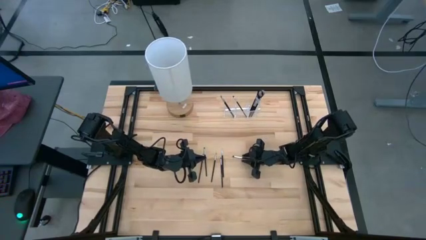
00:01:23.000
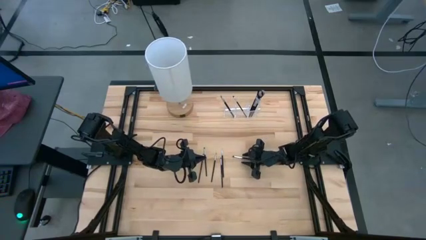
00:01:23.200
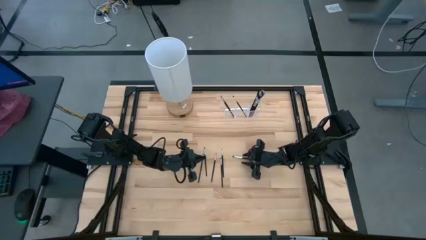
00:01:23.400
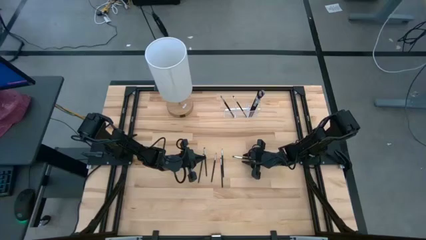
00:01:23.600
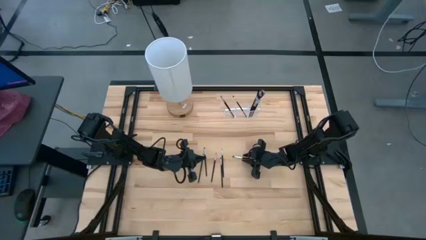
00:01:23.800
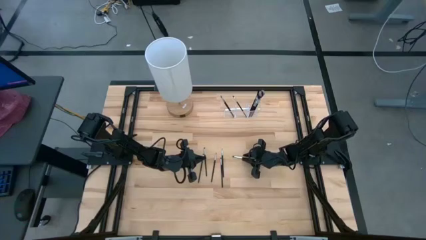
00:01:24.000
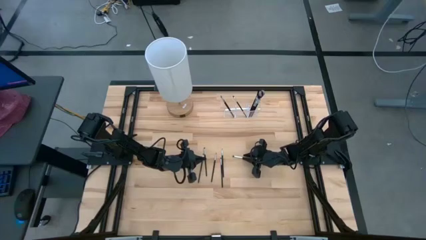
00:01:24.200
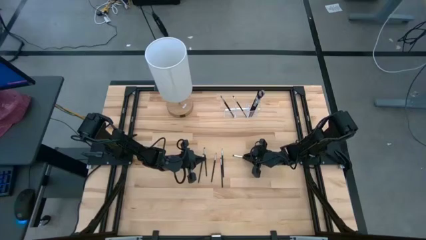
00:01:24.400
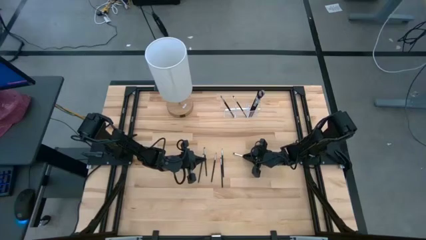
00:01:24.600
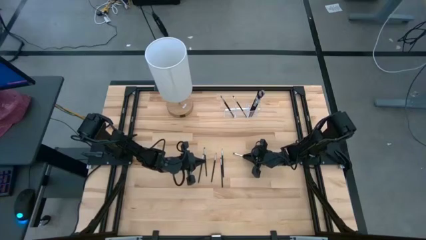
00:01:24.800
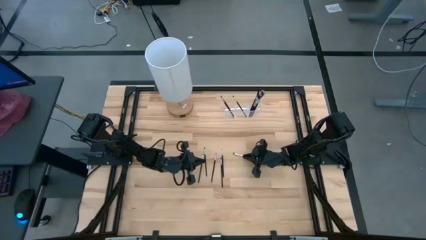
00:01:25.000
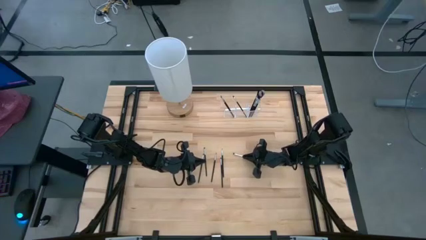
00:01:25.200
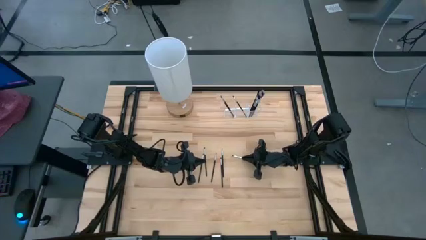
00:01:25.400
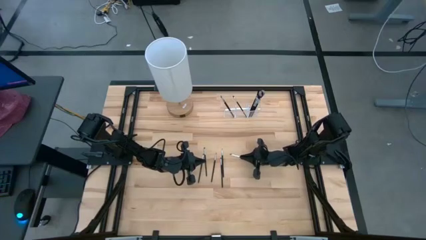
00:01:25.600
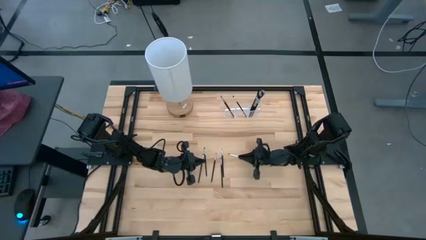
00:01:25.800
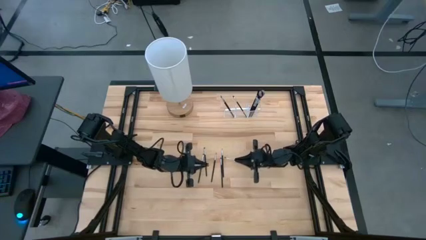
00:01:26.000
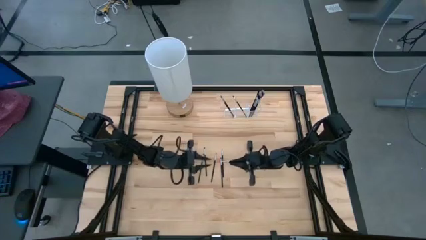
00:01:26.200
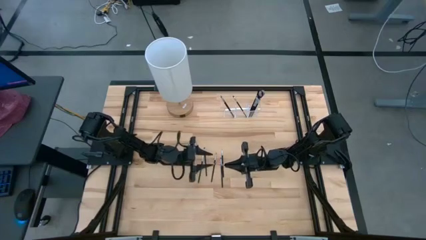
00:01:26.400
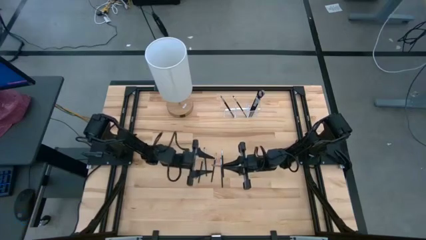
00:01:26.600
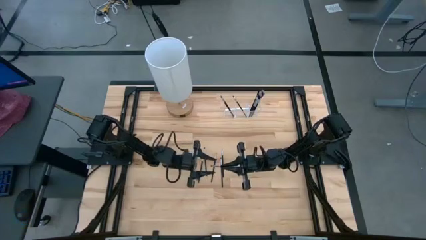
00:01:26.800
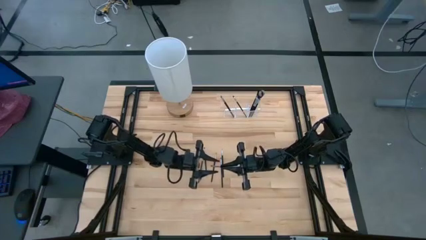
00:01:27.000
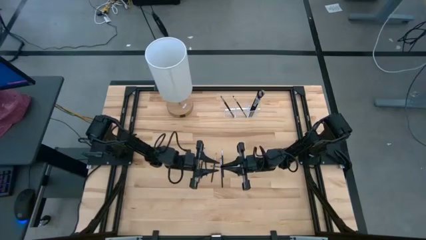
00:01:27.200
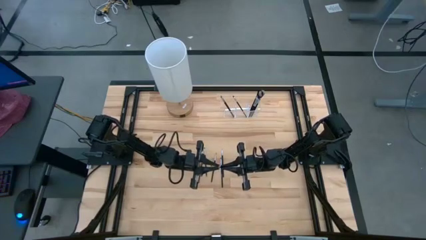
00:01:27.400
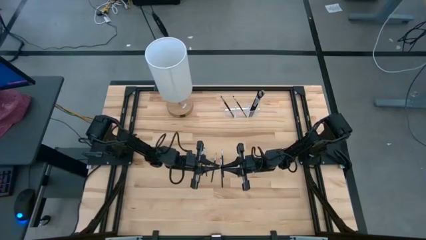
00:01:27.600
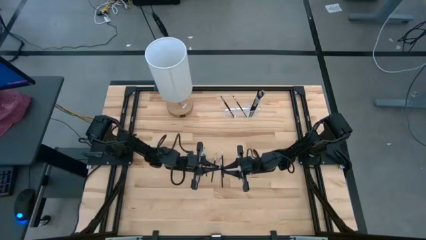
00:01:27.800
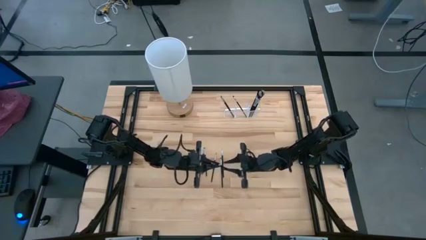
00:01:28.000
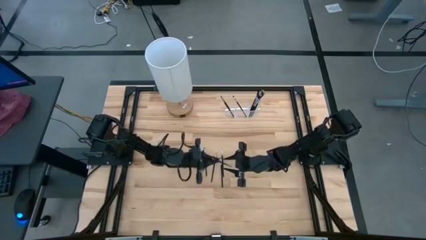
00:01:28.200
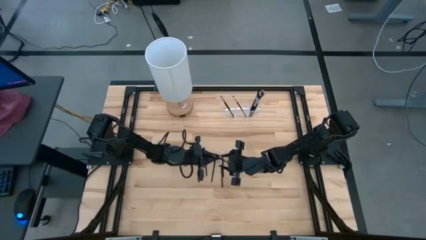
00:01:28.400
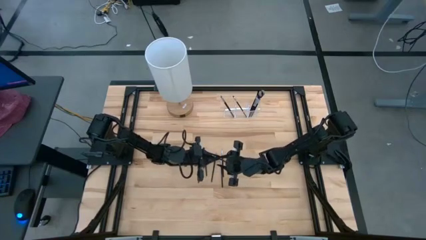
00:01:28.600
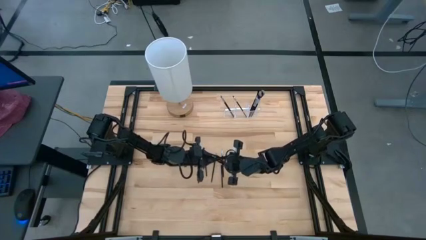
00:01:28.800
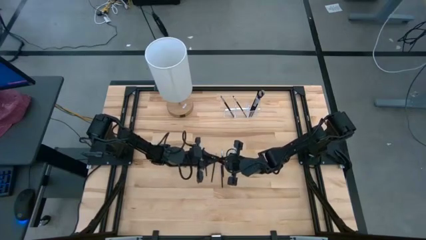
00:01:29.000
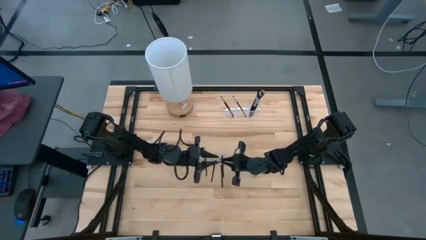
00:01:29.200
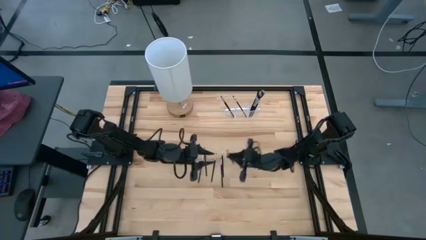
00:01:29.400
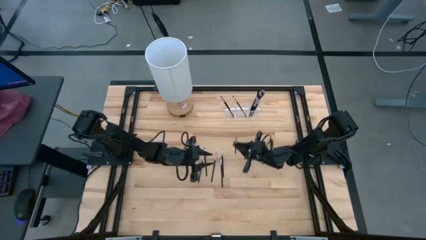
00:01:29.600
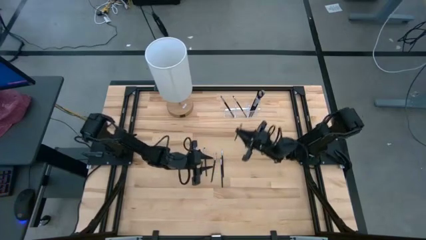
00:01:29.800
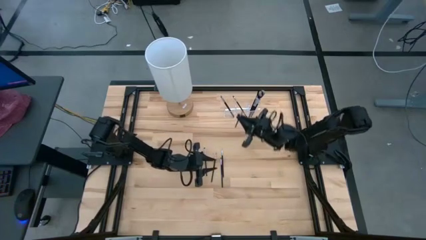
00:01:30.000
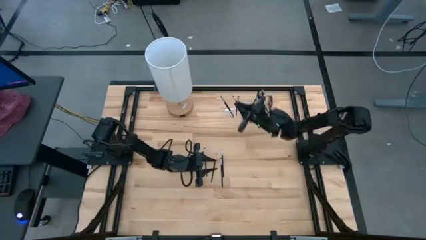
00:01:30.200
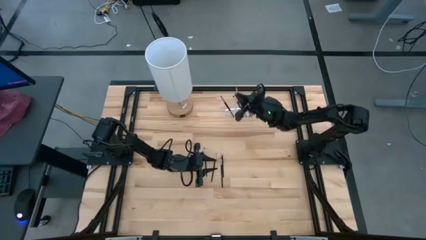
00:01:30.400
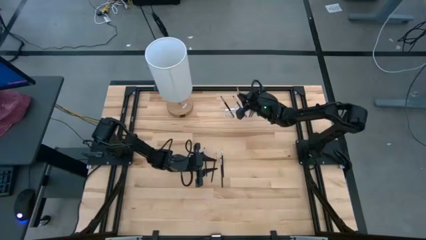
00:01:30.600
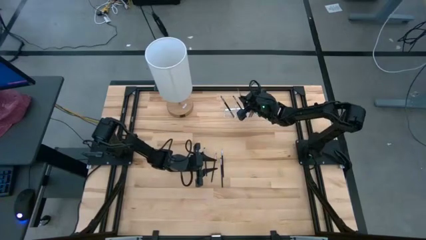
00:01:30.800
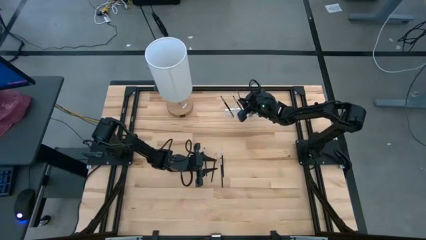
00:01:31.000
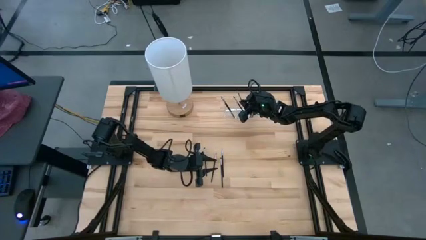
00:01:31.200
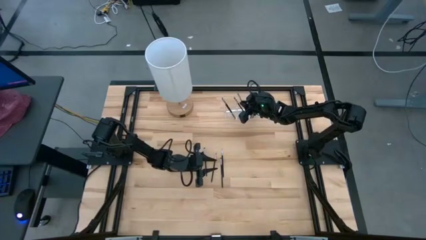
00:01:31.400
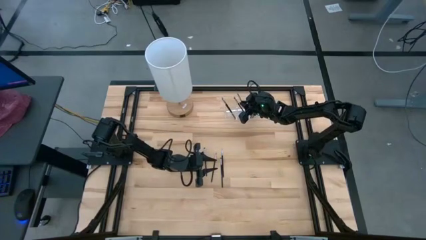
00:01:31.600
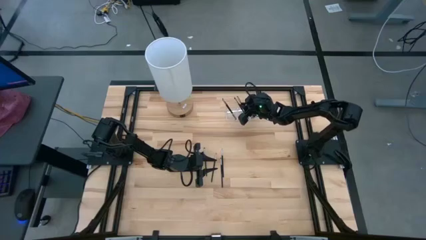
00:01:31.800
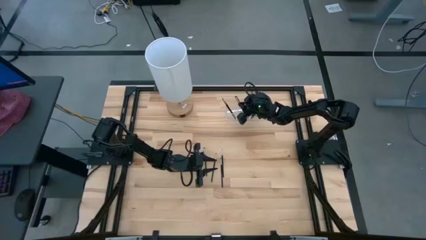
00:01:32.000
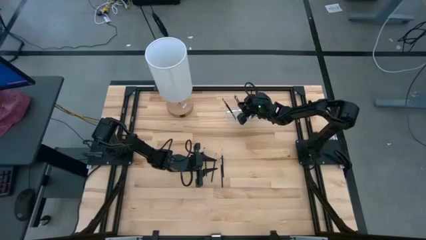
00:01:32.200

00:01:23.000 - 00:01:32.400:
Task: Sort items
Put the eyeshadow brush into the transparent organizer

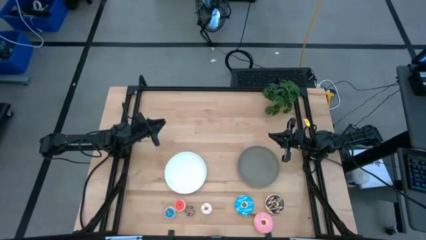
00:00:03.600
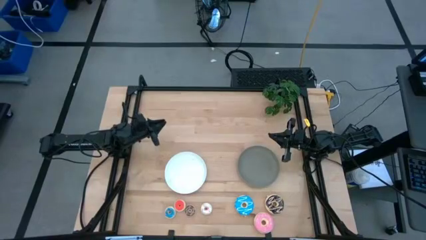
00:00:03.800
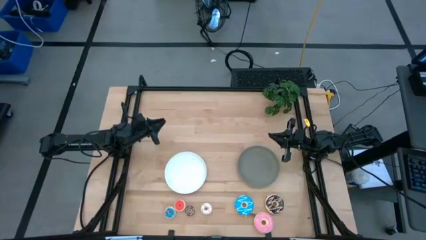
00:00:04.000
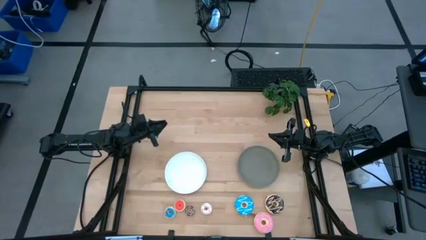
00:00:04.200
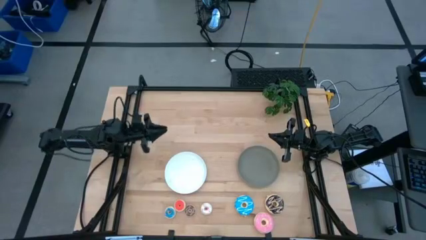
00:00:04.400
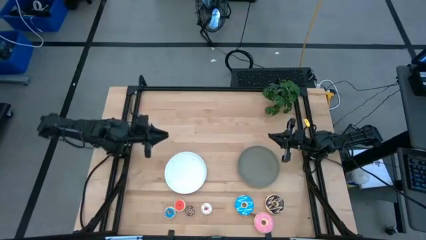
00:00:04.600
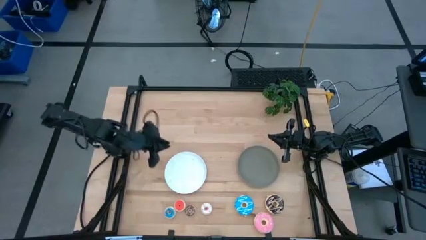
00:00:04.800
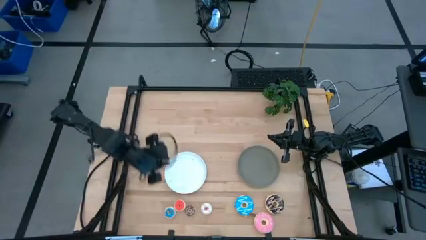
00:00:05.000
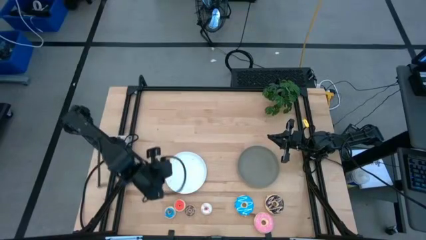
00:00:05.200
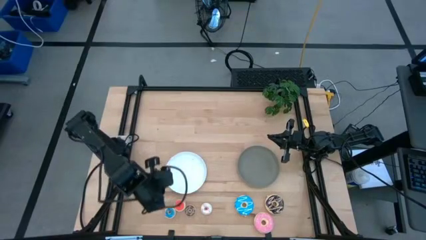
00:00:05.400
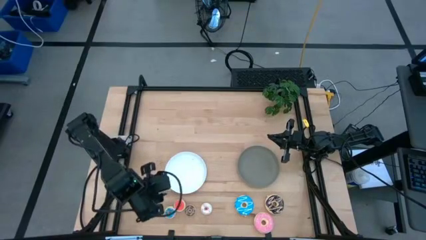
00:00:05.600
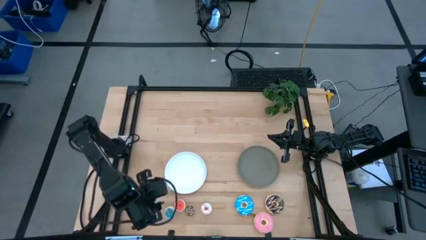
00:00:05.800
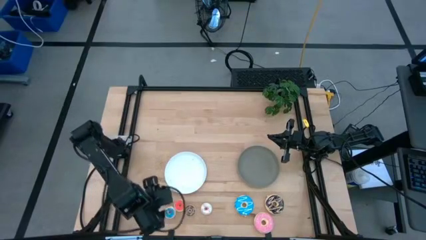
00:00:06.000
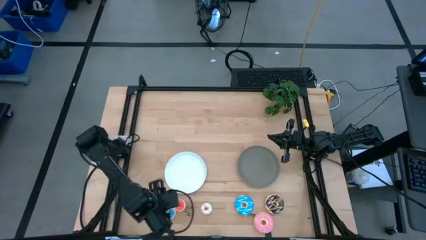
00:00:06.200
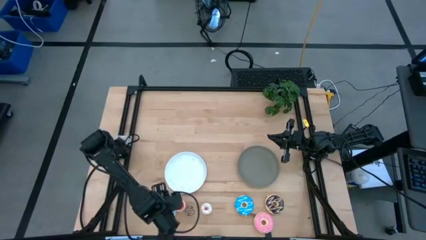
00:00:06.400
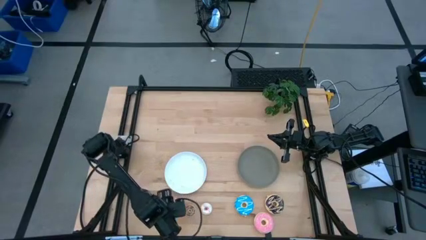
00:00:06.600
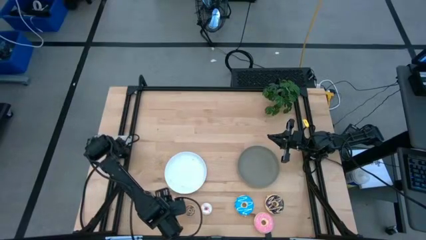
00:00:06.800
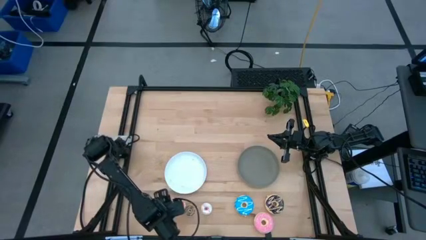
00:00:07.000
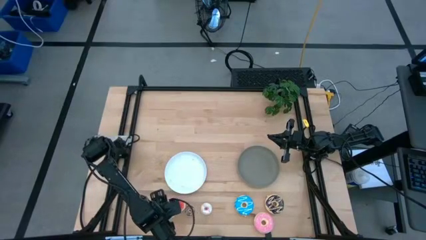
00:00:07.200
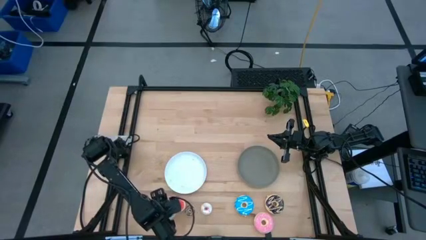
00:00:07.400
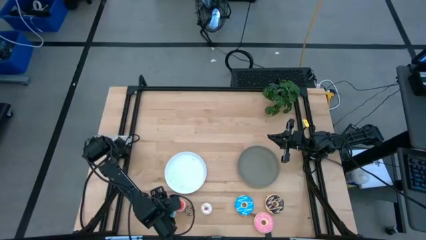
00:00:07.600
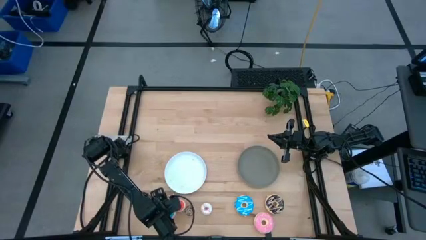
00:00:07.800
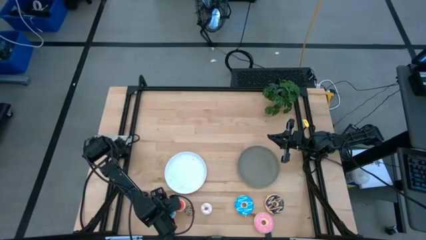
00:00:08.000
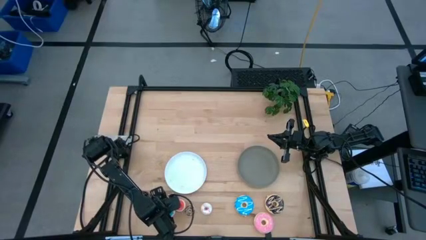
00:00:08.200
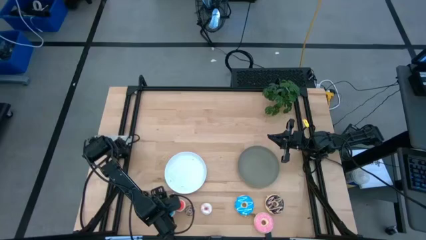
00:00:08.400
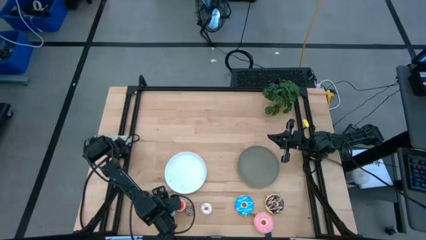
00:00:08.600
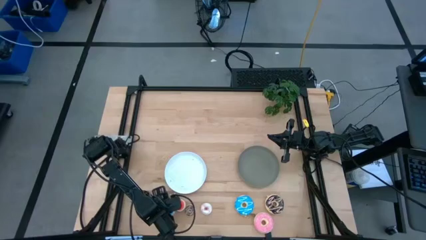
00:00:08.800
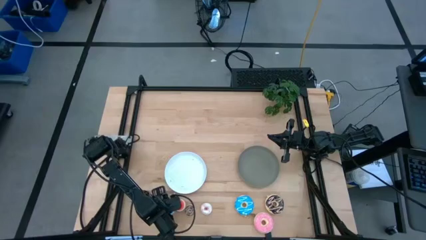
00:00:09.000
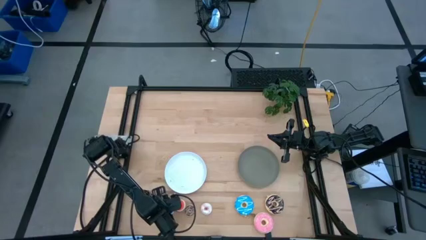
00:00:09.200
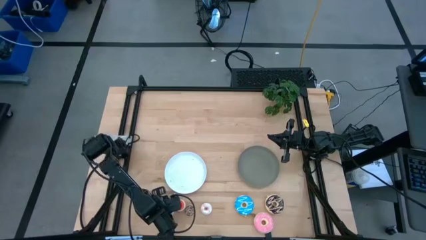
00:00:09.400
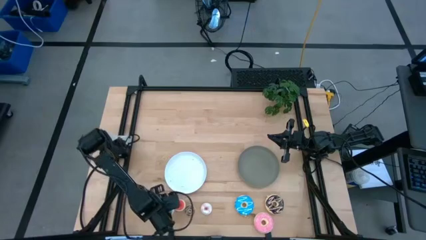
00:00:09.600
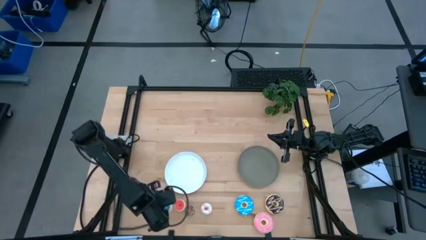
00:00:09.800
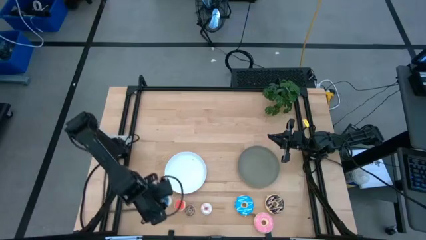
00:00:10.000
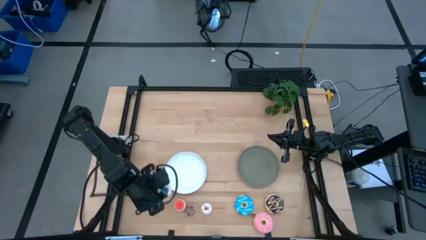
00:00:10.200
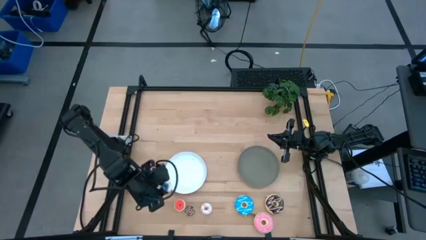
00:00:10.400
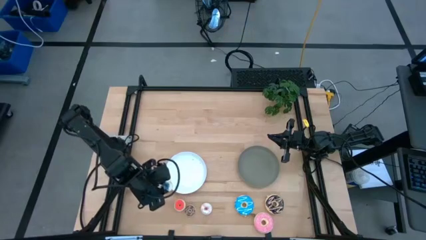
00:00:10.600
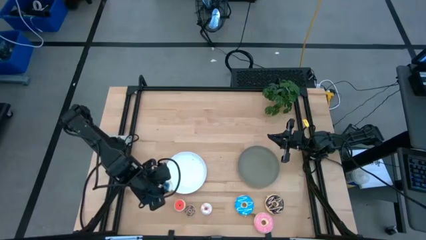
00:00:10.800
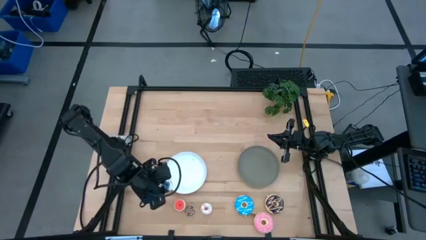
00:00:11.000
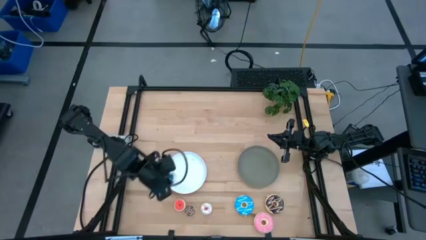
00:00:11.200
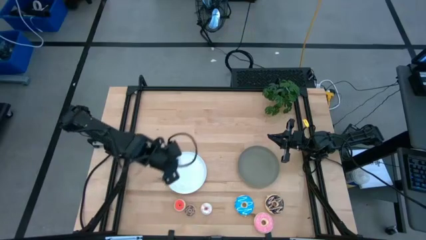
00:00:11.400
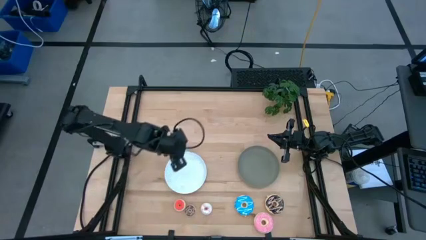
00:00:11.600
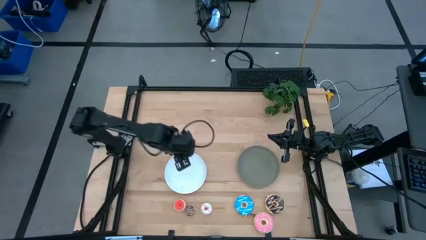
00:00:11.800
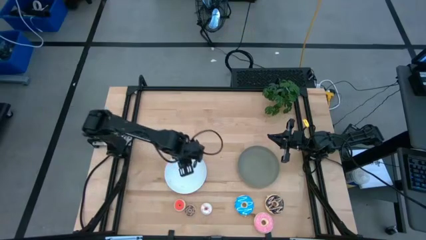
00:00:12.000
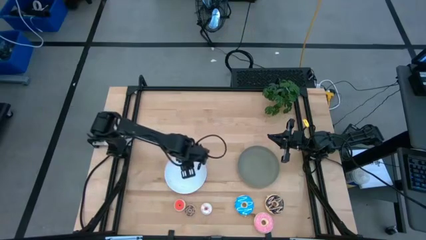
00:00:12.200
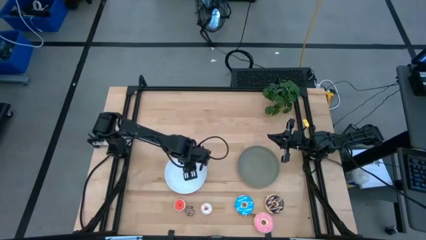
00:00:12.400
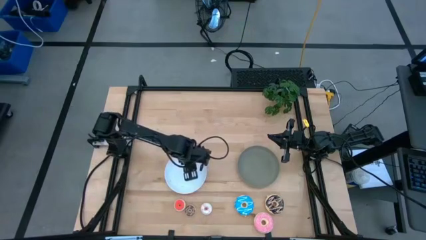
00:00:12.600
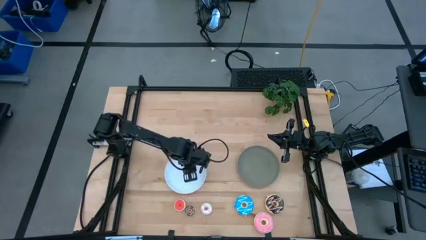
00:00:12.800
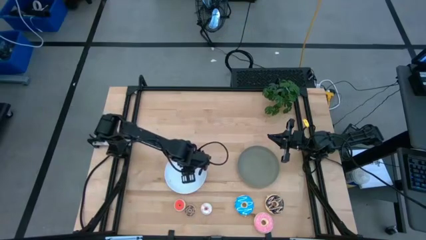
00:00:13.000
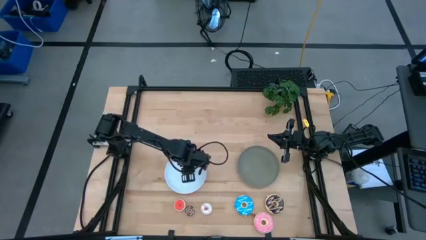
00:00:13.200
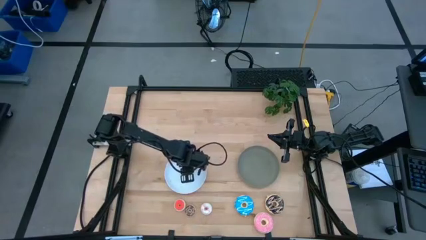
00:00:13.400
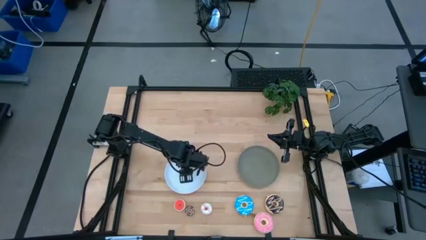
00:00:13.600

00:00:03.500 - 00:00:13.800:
Task: Pick & Place donuts
Put the small blue donut on the white plate
